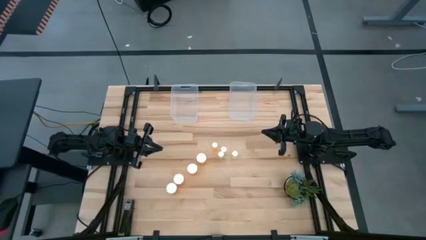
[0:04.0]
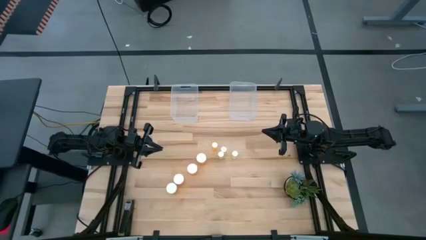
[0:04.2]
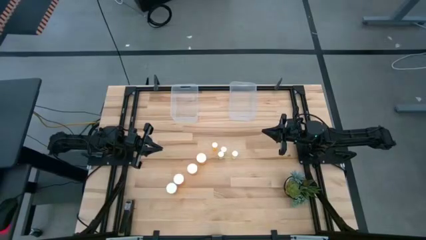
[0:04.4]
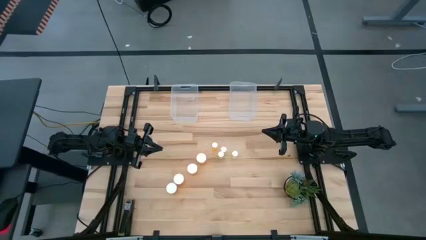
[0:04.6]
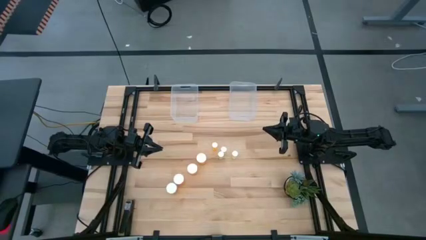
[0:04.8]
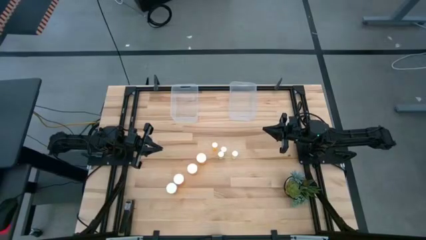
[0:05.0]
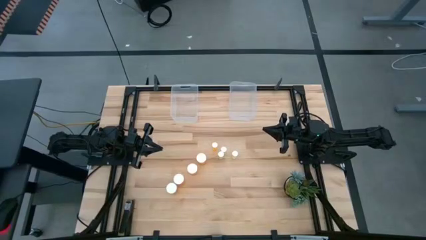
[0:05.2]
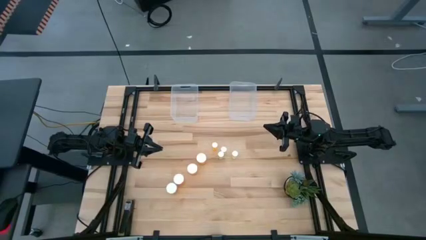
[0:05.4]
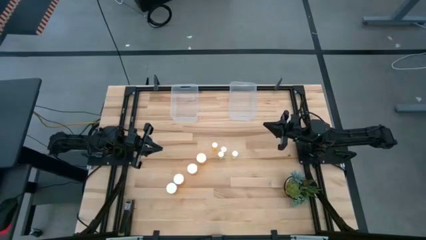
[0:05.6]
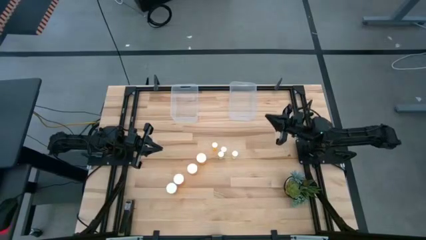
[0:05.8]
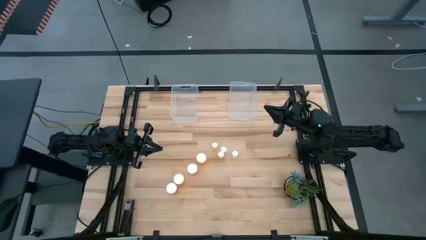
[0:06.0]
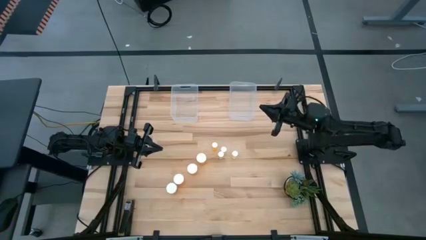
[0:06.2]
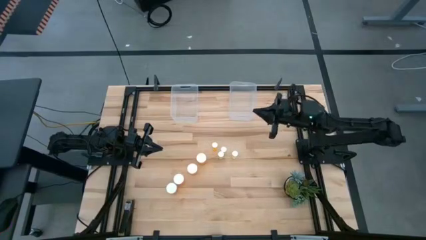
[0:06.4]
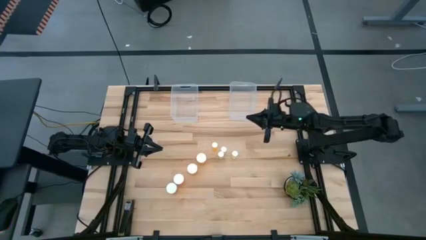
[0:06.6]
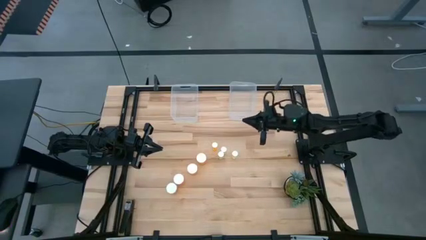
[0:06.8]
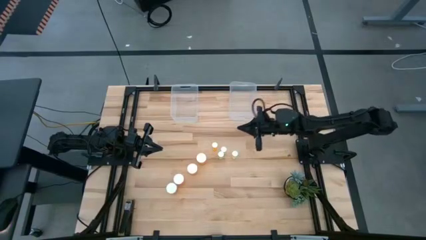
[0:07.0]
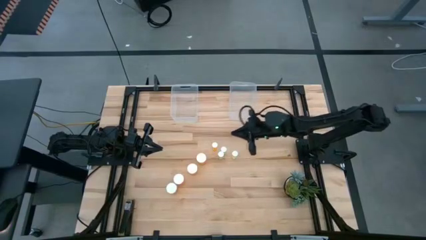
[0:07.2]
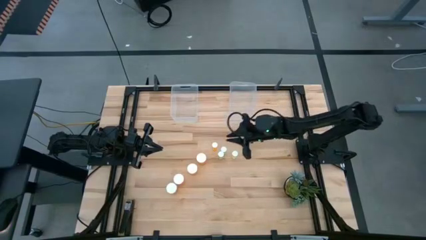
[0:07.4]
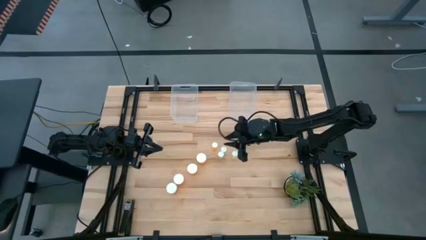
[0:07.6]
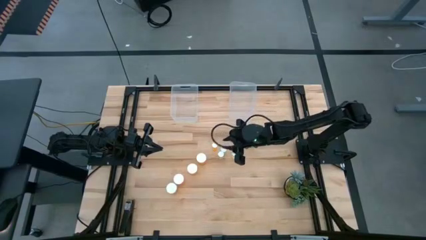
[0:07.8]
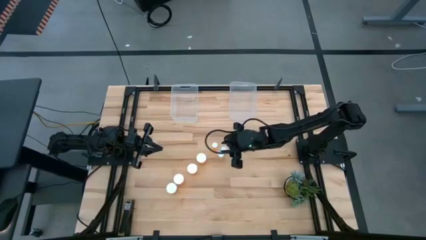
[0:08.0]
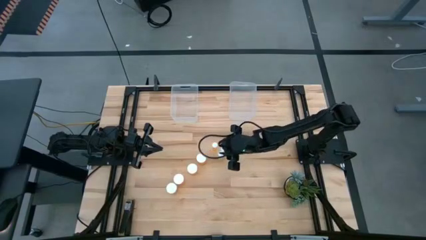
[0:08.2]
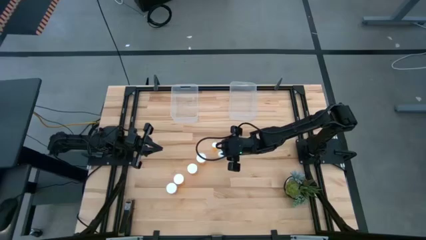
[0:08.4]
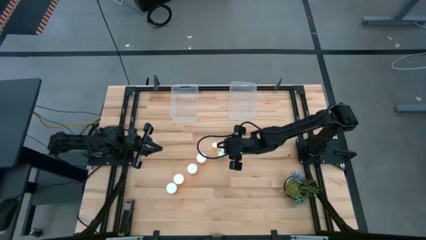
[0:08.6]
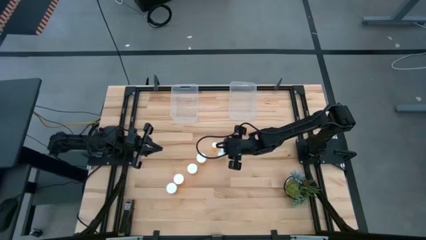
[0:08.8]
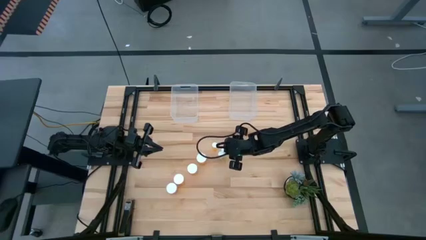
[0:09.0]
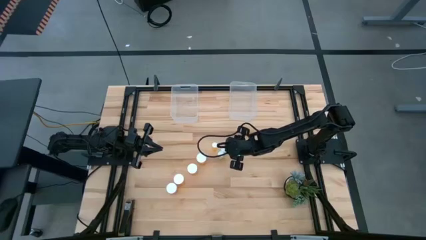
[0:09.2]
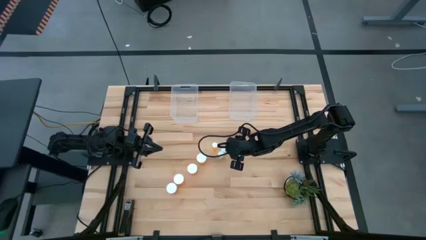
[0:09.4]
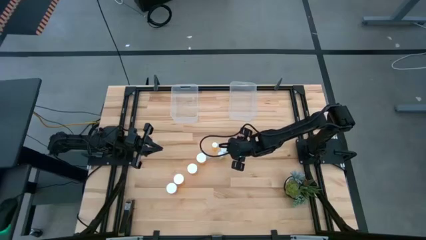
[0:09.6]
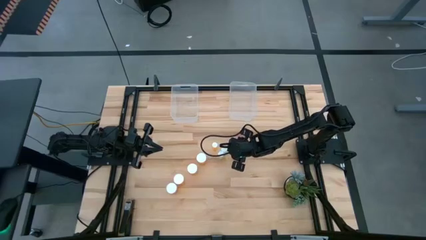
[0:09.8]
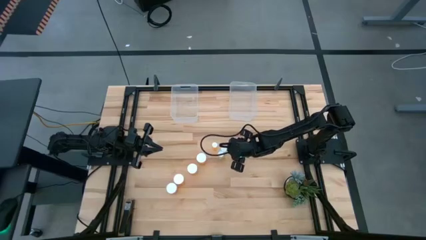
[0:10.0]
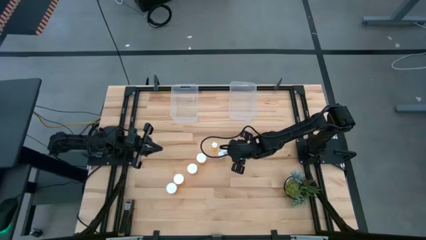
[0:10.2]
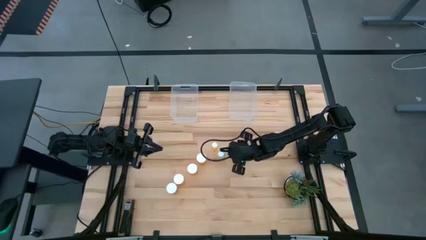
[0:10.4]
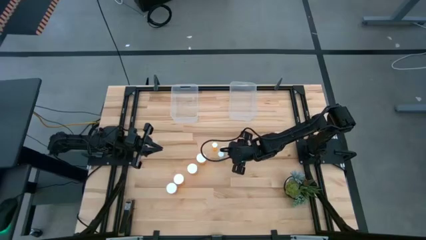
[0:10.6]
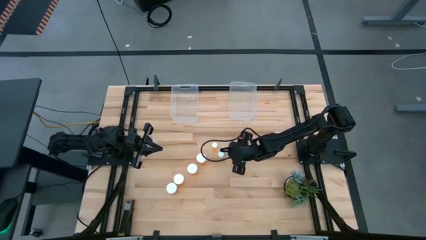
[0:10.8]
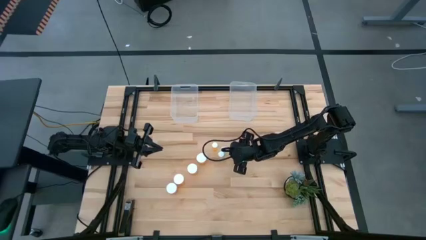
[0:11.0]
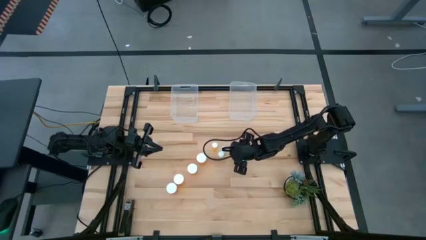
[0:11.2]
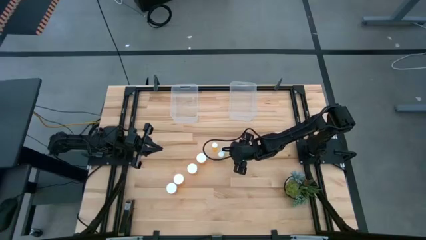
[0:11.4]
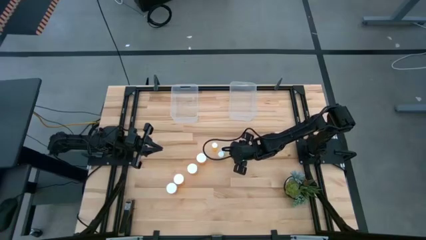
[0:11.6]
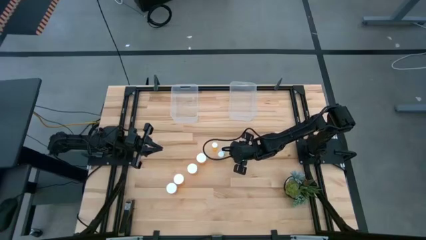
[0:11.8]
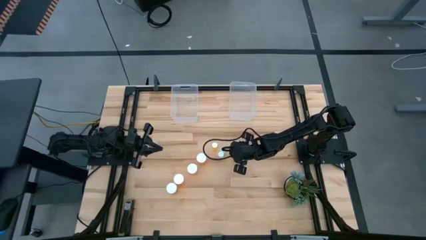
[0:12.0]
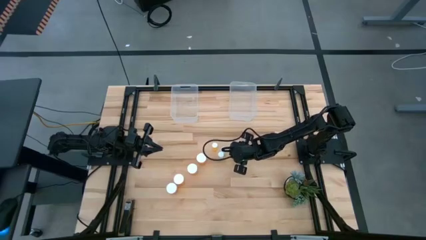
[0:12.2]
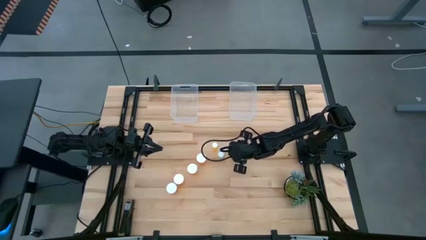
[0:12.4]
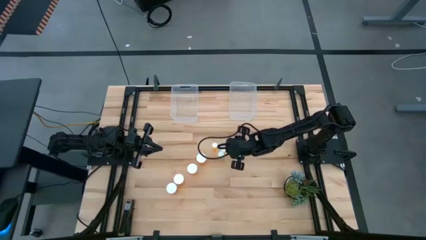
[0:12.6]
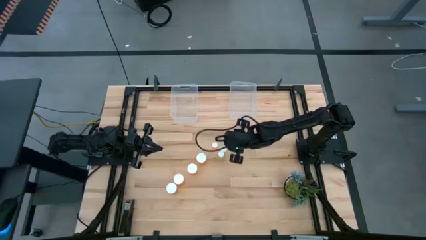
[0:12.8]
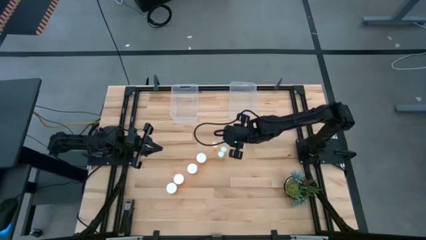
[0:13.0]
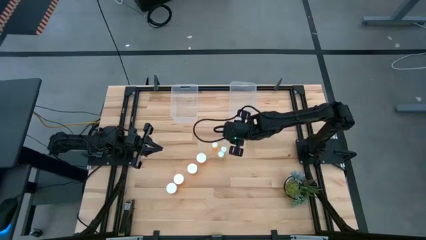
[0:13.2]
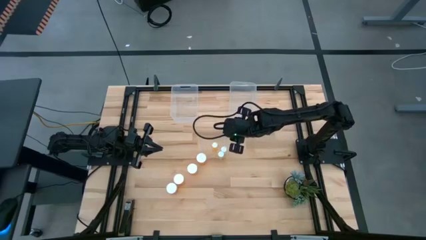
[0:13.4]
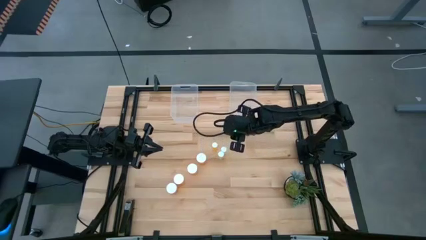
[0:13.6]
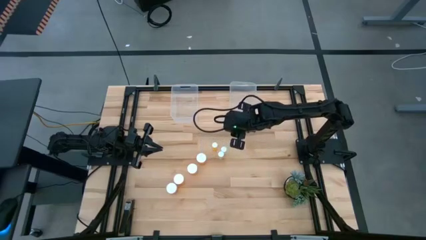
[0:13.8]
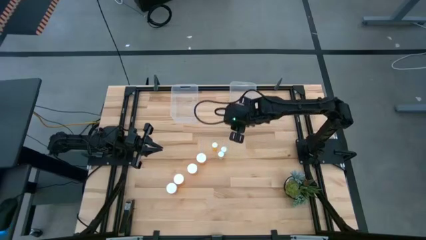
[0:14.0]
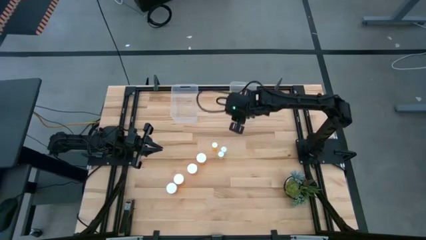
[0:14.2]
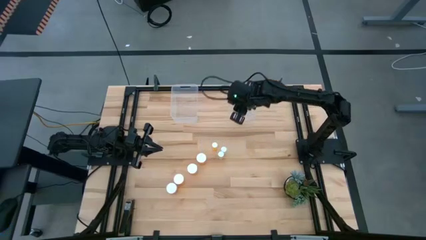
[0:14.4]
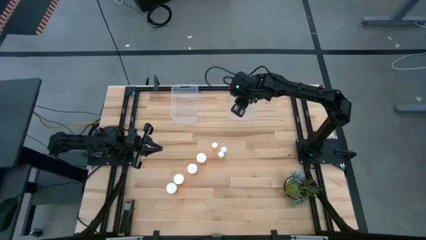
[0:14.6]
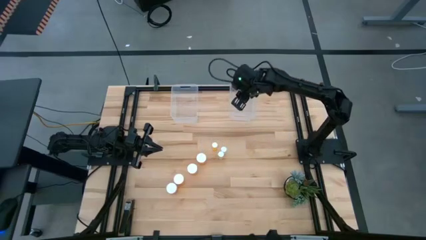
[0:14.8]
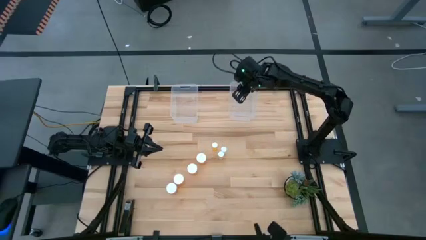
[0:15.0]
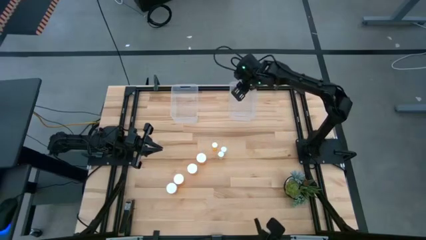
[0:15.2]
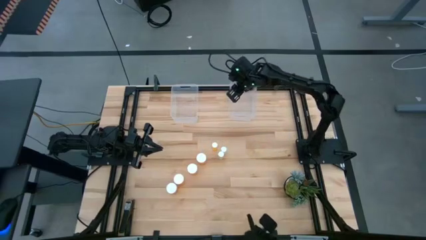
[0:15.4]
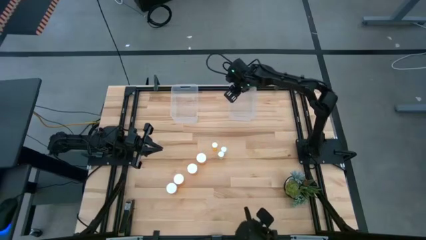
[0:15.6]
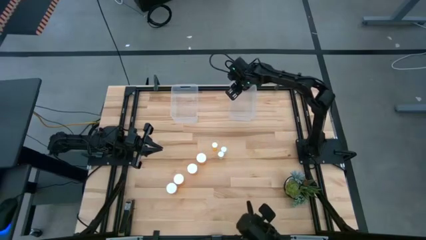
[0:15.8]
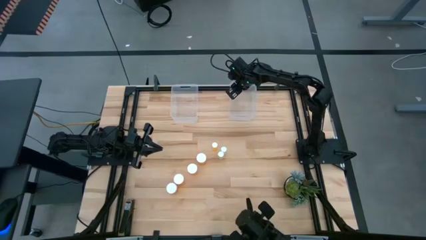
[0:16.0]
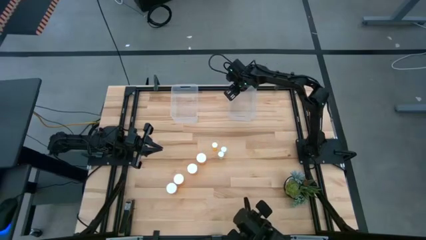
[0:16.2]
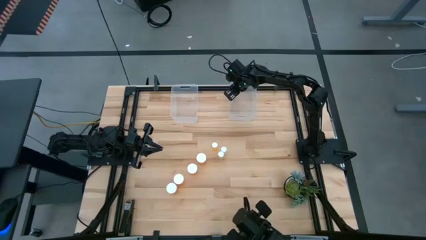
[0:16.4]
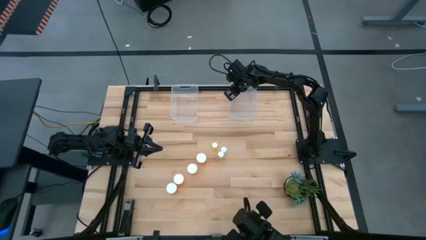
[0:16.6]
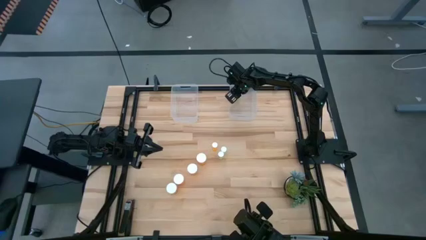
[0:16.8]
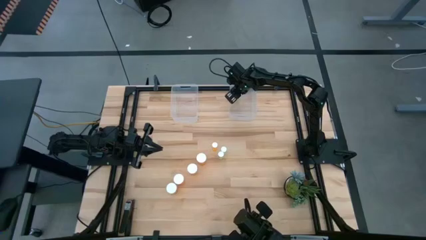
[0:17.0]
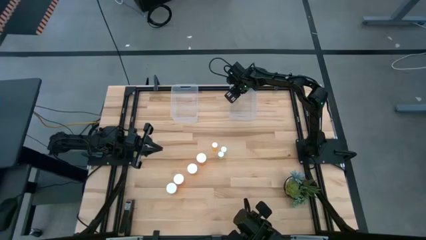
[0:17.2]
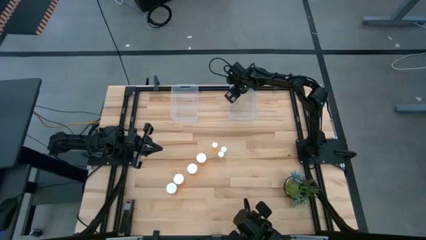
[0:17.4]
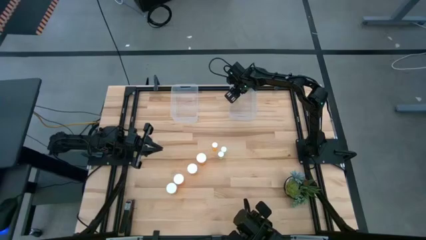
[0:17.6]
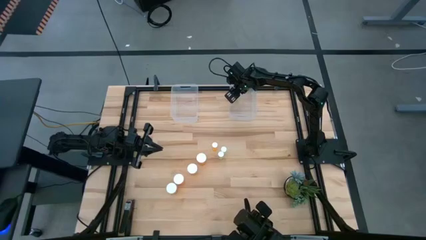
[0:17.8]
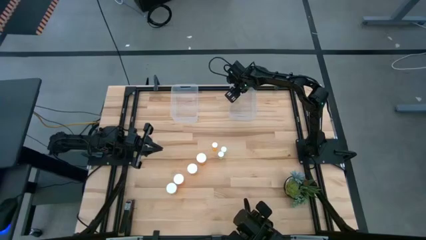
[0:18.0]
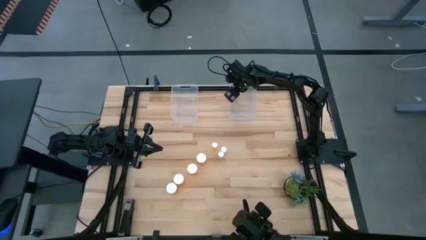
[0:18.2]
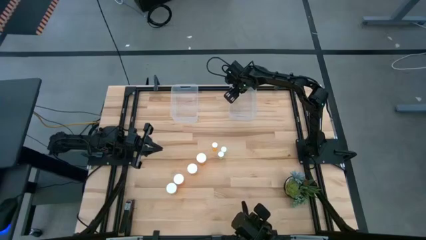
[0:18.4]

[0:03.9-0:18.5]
Task: Pick and place medicine bottles into bin by pill shape (circle, oval)
Put the bottom left small yellow pill bottle into the right transparent bin
